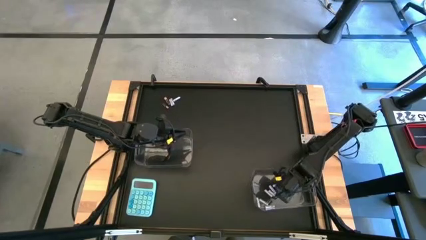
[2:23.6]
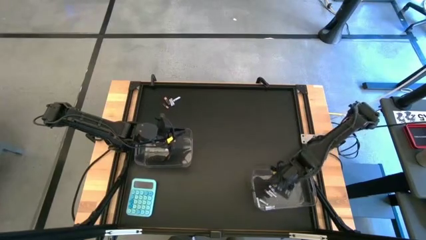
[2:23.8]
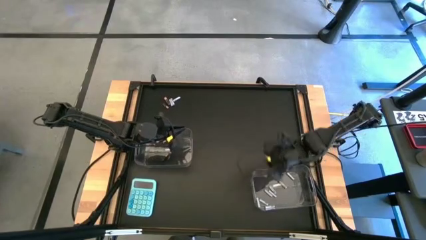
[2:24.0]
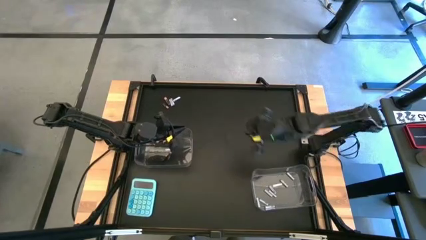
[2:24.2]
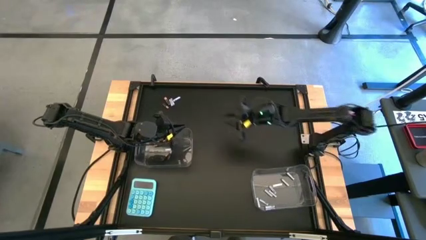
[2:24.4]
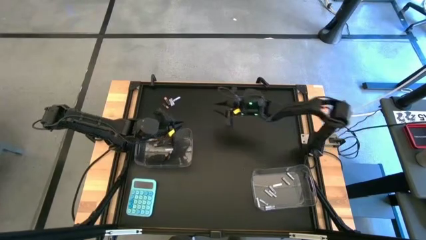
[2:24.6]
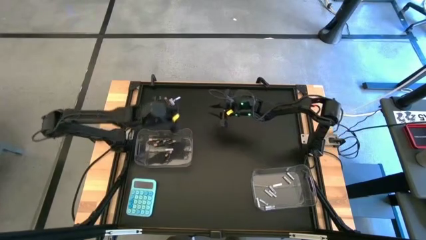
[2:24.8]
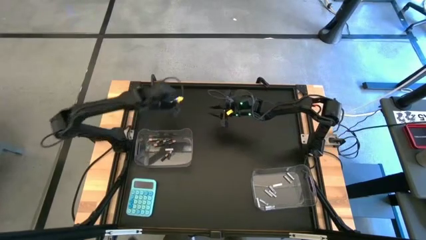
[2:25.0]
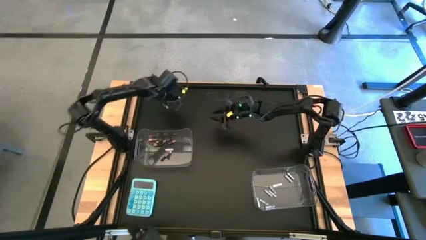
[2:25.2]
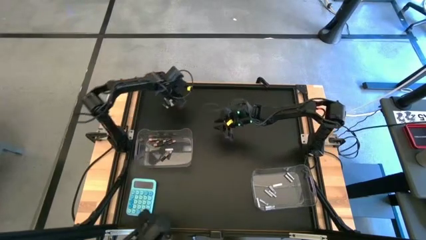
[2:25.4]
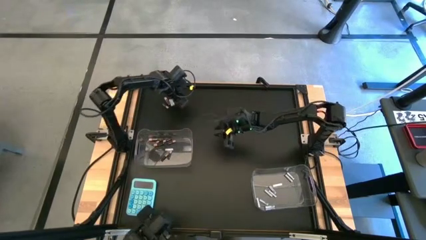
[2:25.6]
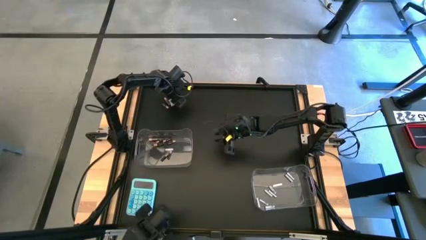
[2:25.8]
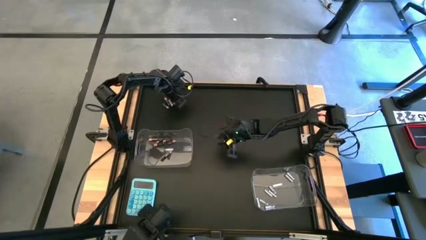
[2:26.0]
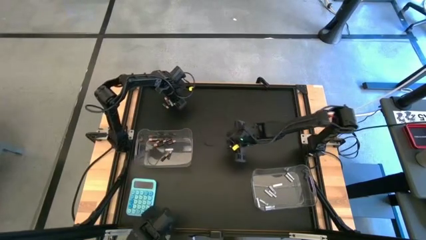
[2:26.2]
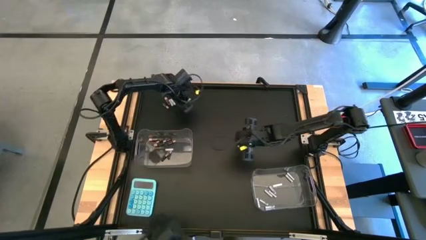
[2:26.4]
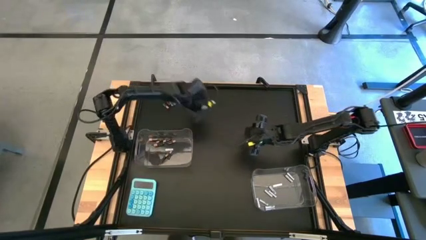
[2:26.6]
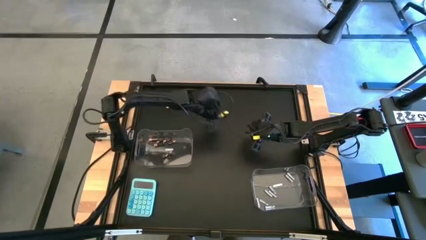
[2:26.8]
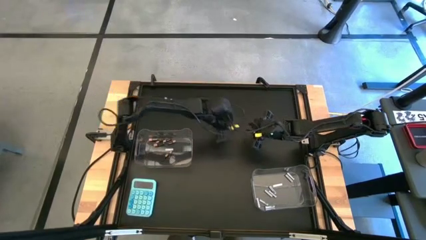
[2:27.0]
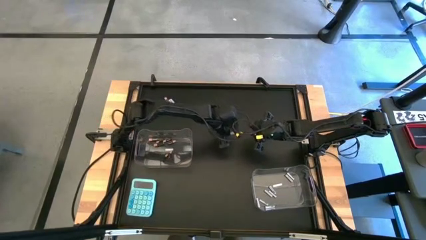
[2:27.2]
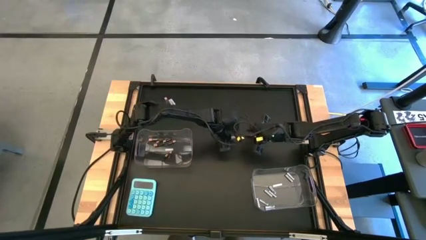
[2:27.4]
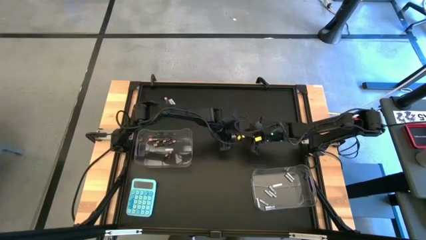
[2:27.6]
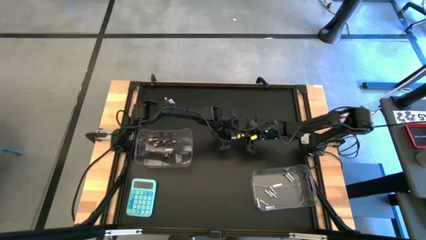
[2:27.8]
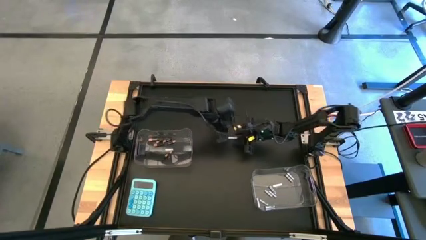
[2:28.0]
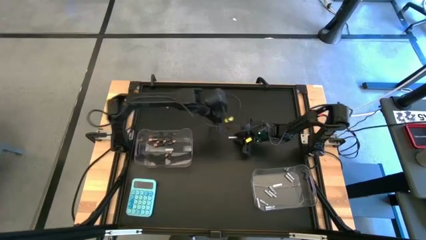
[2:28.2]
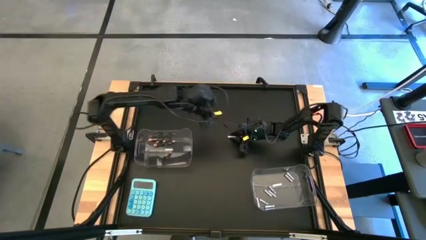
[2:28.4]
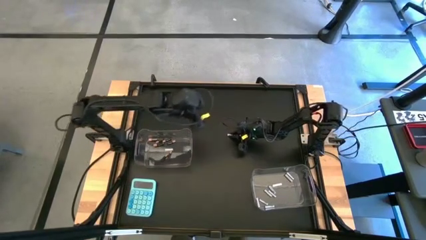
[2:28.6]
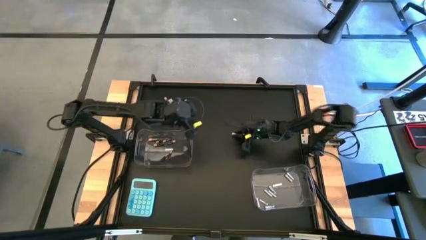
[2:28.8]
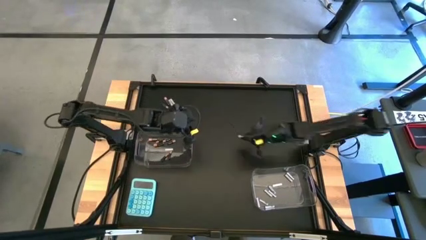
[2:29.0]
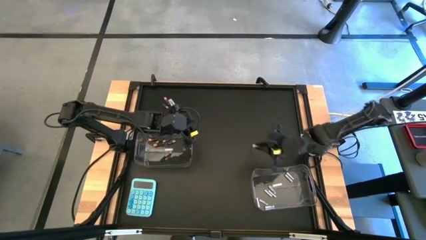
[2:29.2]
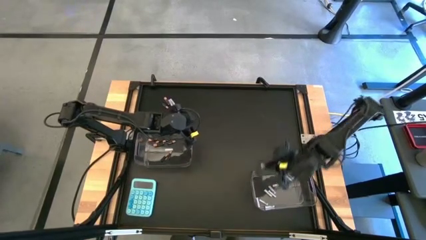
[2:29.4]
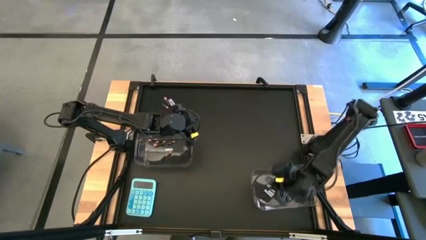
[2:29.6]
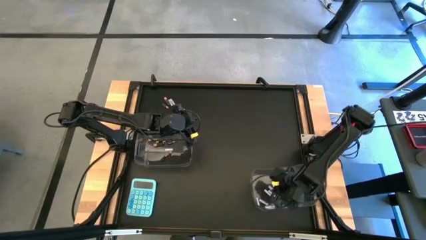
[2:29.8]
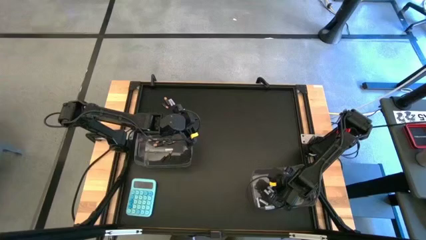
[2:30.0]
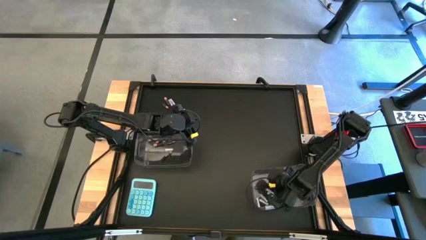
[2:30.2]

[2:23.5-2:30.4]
Task: Sort batteries
Put the white battery into the right transparent bin

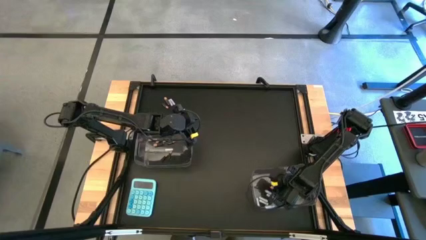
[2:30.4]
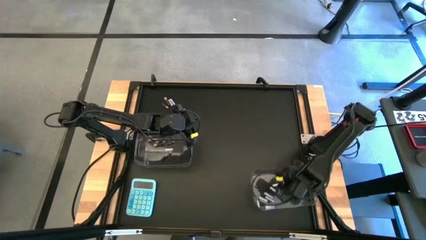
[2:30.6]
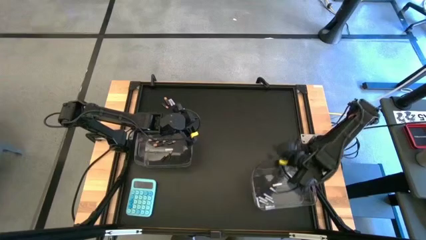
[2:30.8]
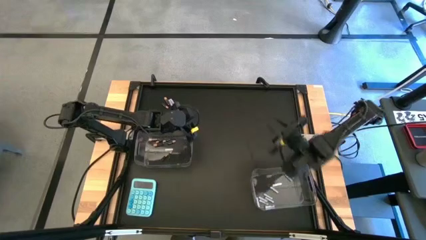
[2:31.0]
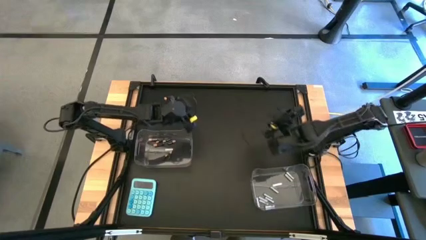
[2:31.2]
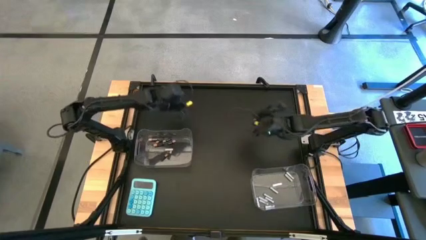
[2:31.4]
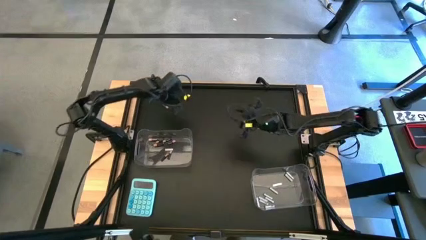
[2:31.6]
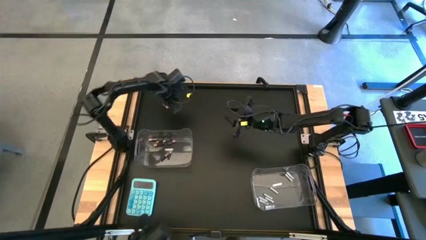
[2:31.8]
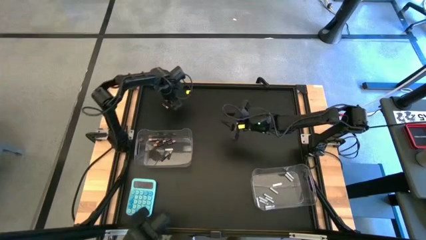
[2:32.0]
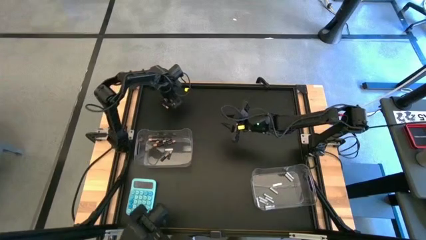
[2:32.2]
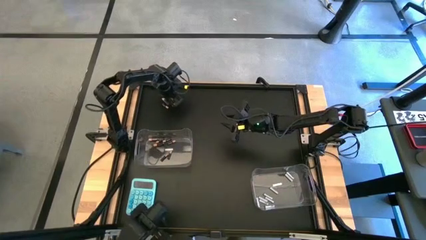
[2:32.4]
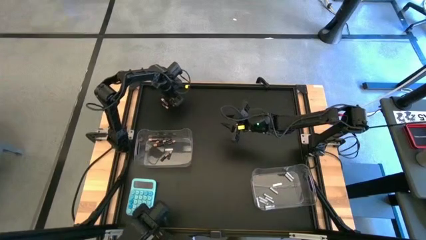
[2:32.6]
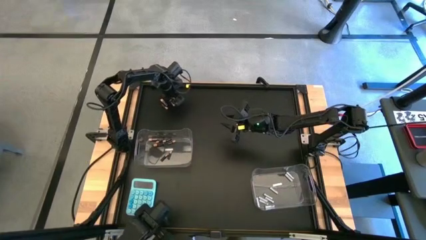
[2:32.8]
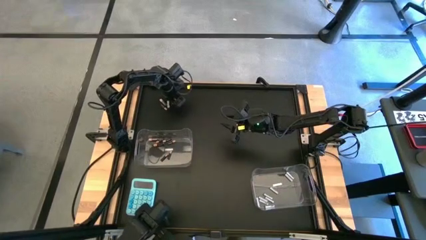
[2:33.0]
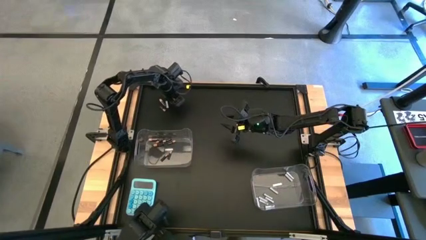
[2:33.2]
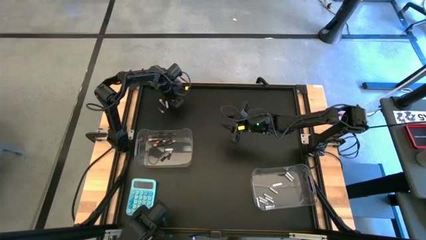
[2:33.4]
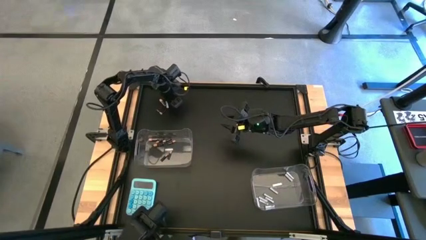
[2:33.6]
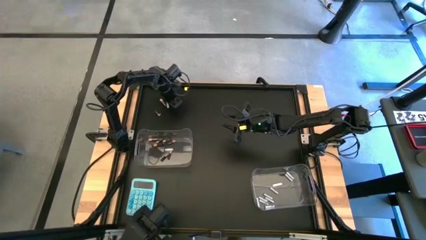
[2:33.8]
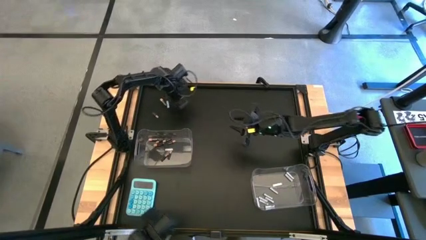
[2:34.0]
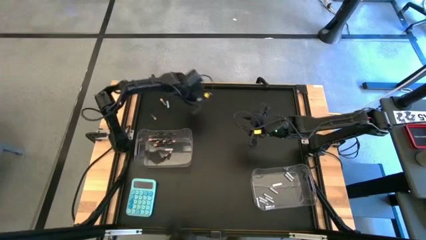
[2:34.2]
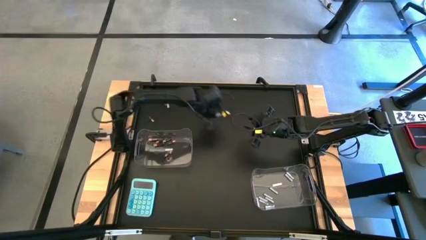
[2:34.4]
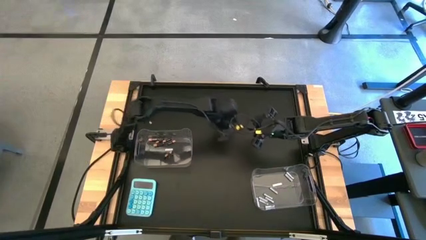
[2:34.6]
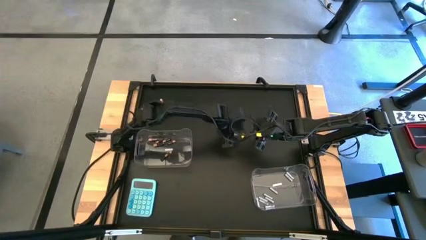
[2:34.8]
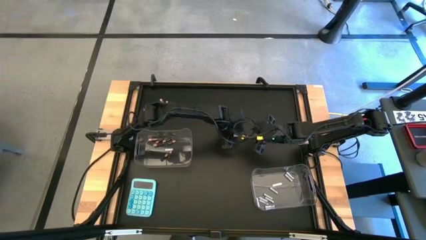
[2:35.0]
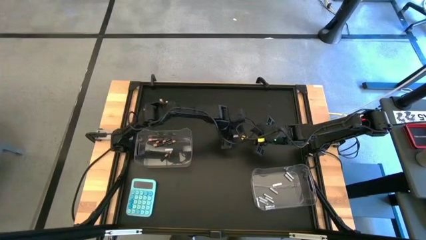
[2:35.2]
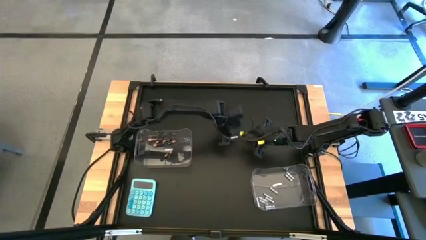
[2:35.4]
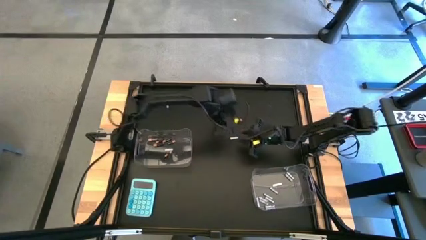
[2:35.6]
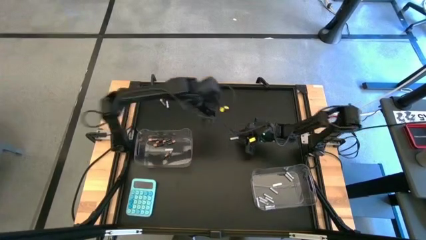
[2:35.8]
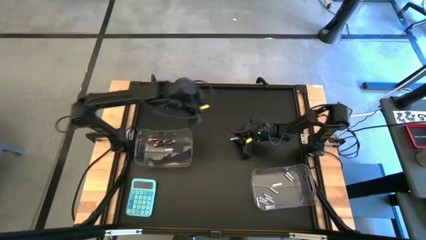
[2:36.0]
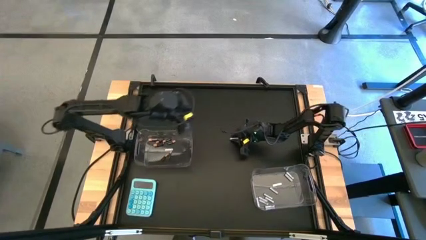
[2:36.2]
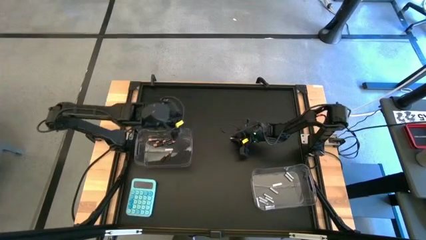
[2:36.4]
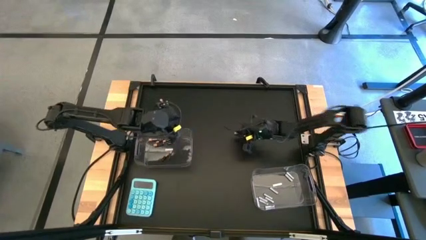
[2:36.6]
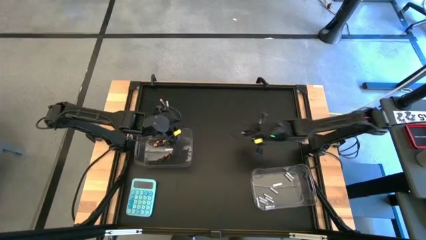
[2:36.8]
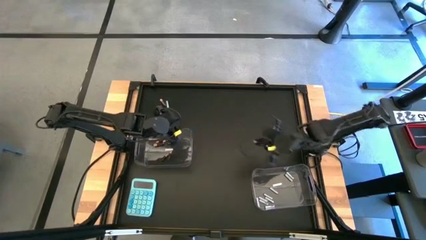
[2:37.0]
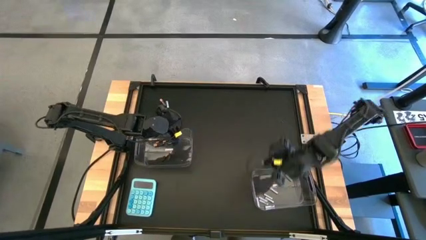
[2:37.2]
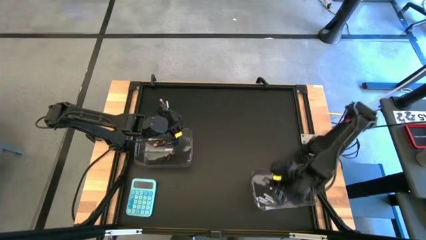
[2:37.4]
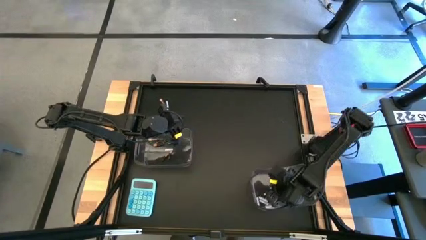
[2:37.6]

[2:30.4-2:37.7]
Put the white battery into the right transparent bin
